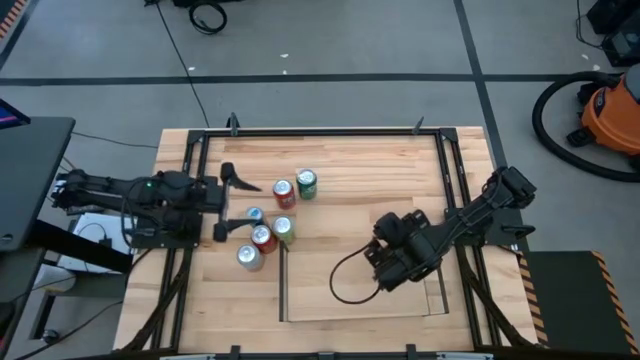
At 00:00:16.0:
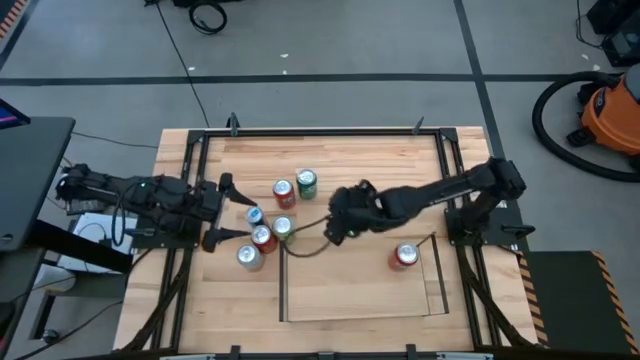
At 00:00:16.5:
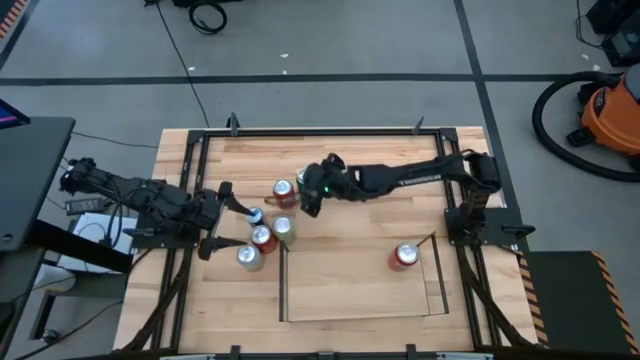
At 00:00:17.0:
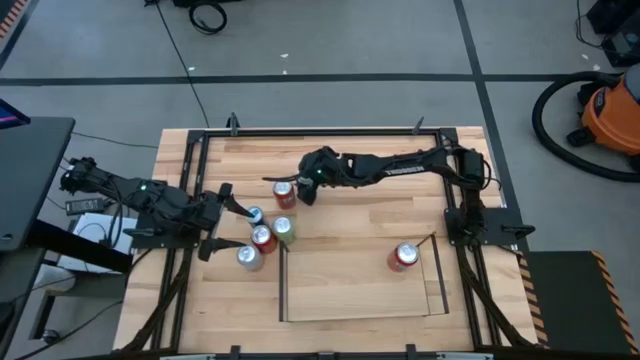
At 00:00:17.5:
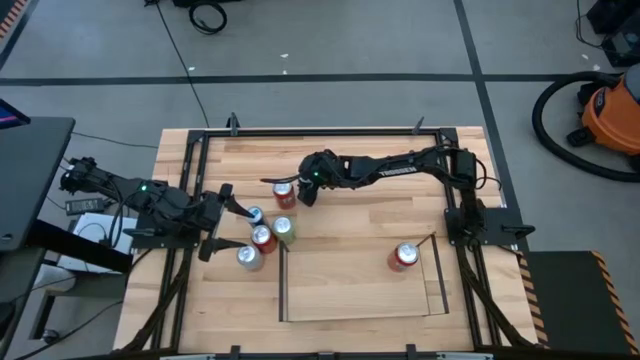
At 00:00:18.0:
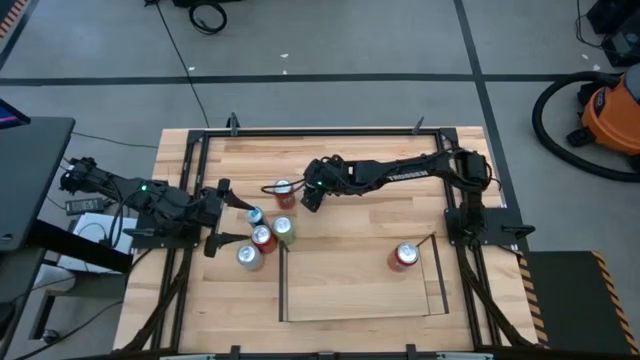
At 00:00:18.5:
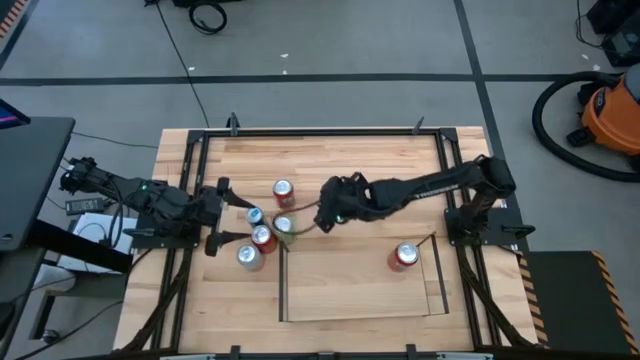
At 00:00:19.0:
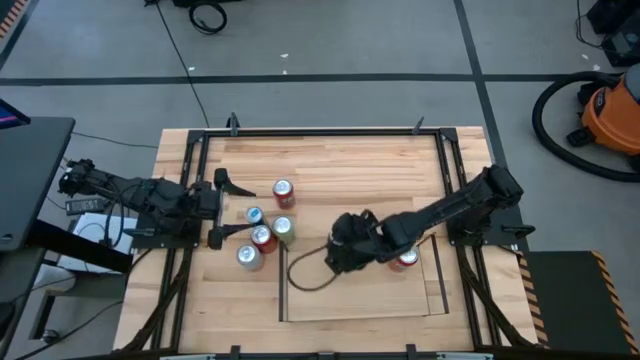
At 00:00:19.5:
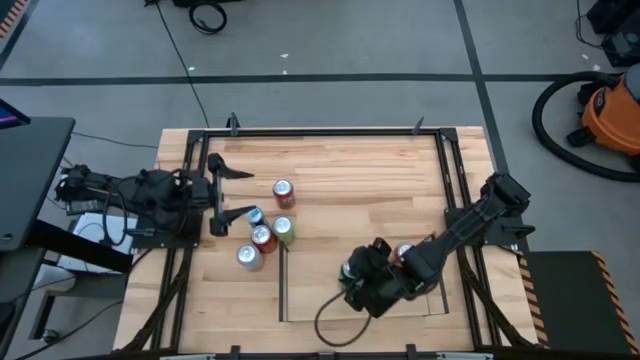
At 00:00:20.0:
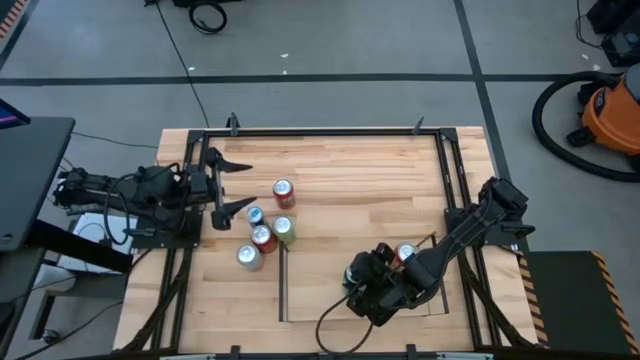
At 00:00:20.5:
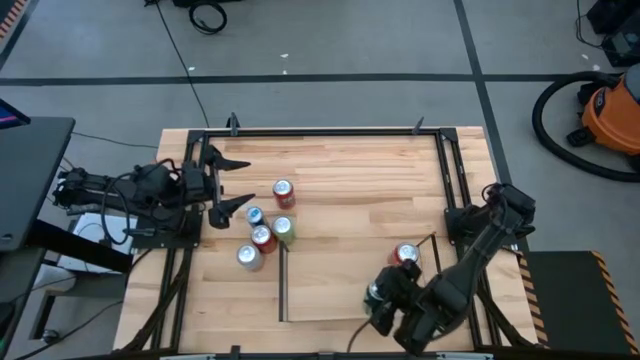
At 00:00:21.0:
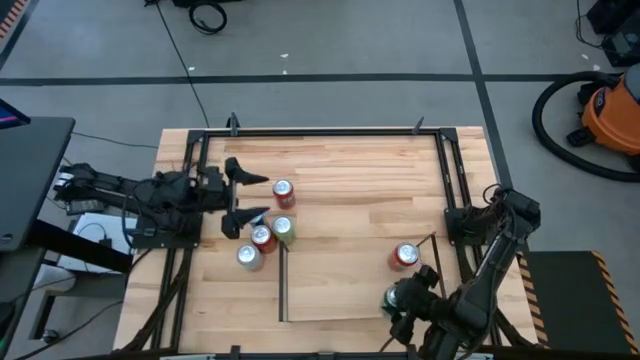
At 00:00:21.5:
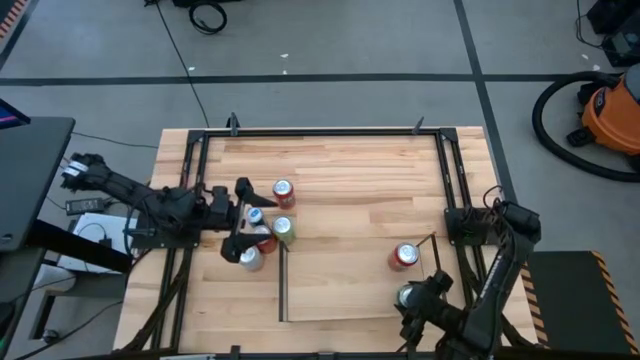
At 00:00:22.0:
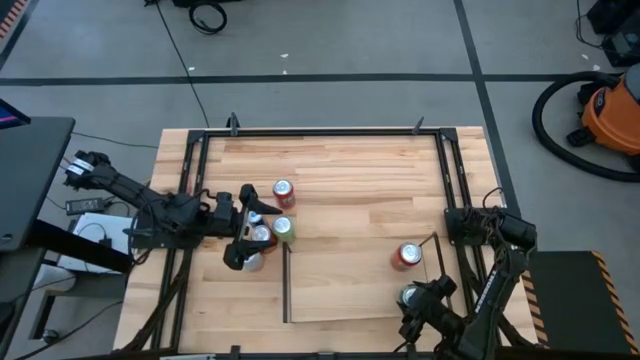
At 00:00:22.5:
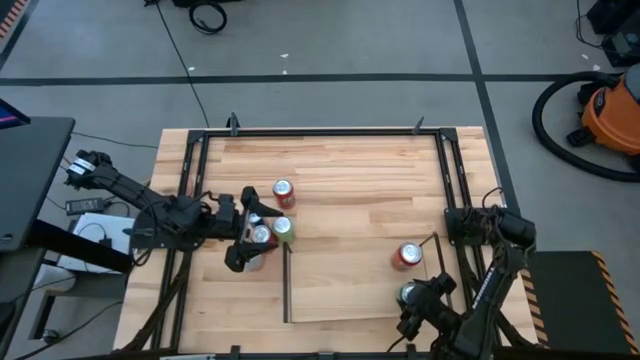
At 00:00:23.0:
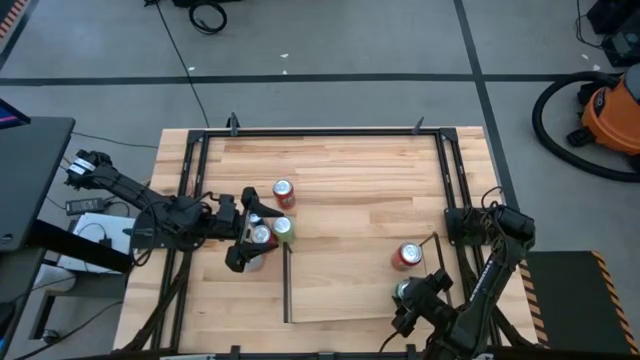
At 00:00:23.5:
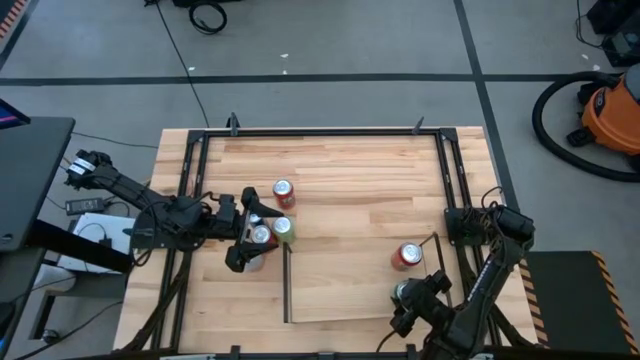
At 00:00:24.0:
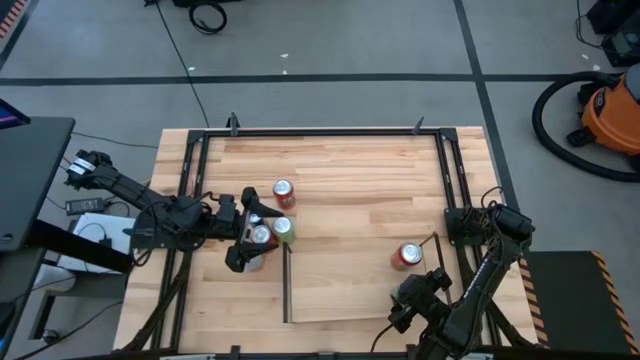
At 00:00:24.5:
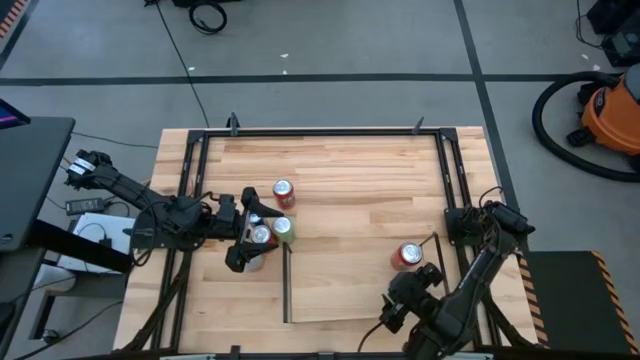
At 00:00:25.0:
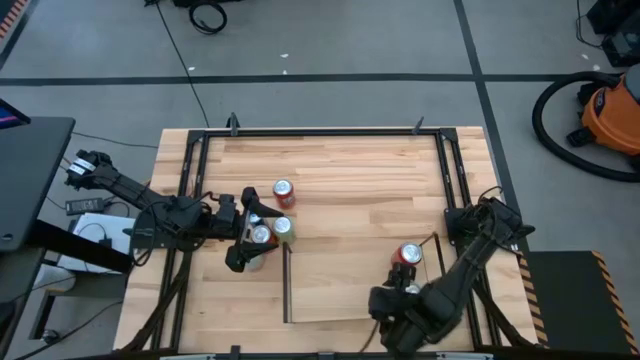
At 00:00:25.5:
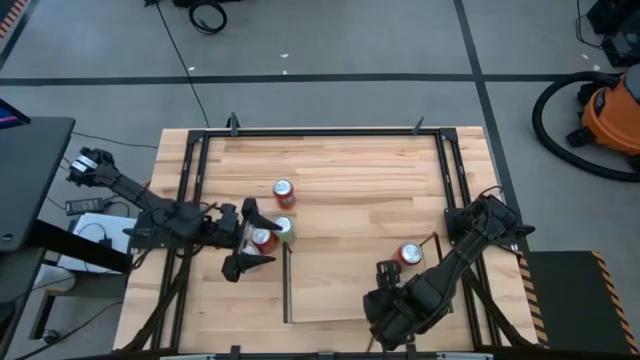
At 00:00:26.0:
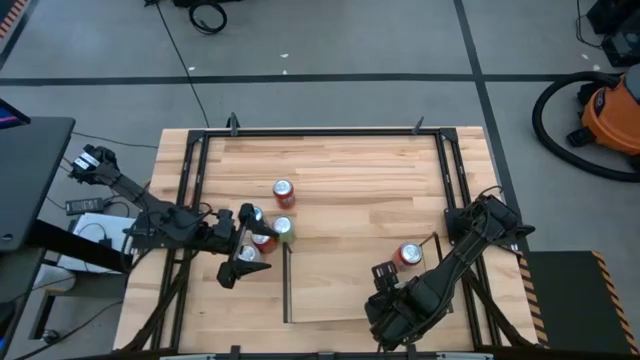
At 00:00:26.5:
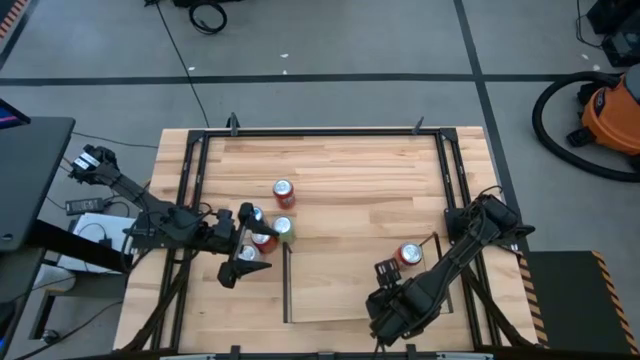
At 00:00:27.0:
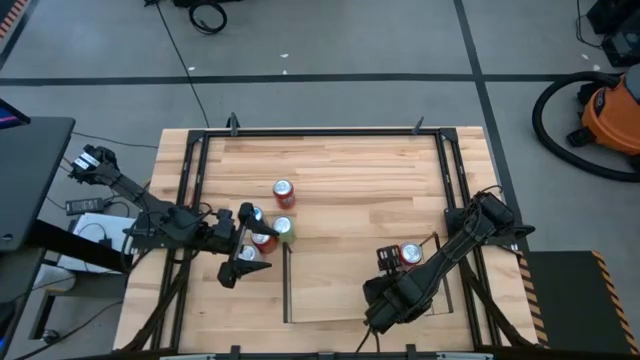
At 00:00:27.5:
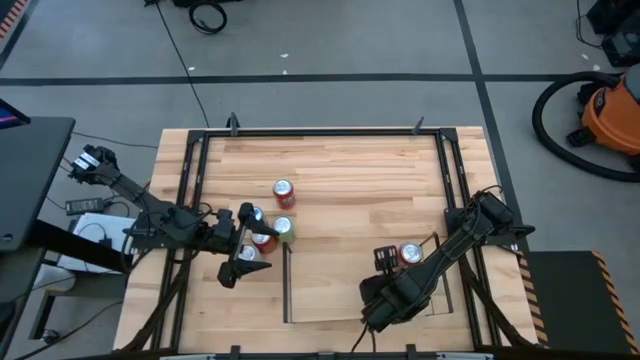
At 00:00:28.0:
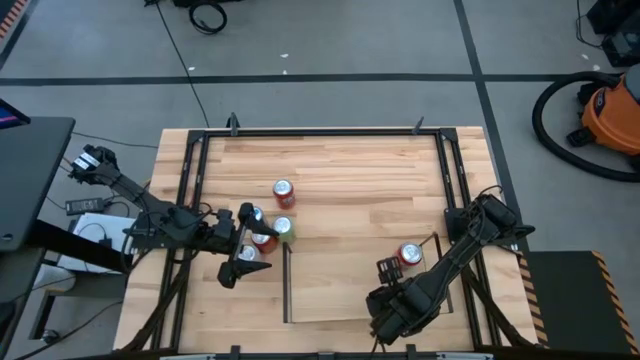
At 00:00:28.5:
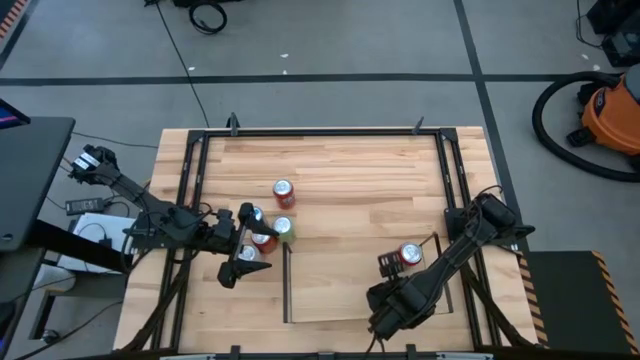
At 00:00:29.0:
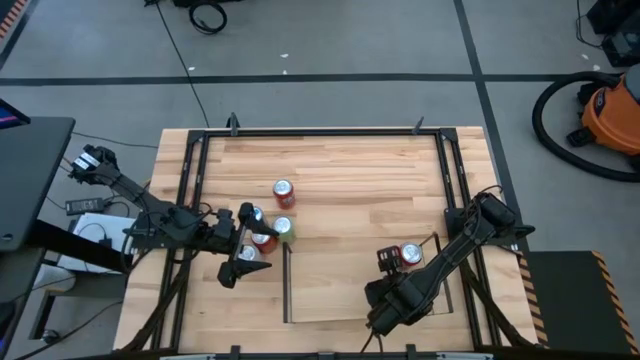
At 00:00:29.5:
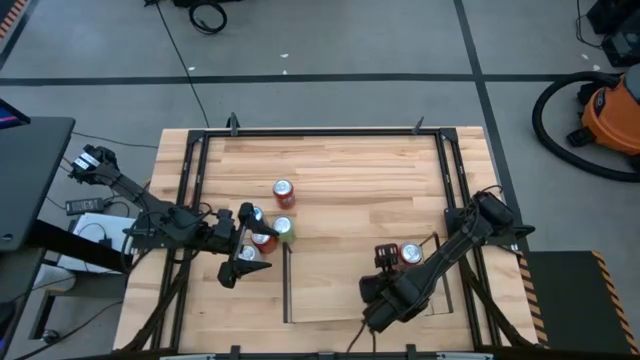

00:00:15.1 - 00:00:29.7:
Task: Place canned beverage on shelf
Put the green soda can on the shelf

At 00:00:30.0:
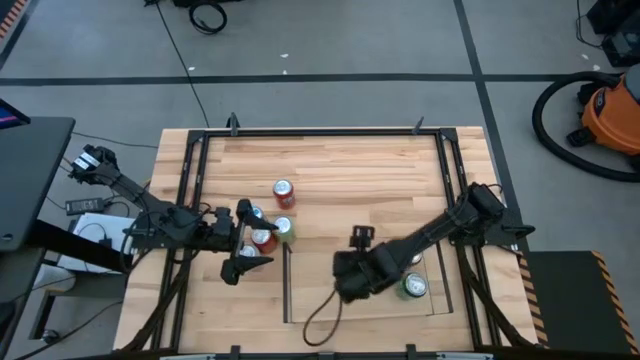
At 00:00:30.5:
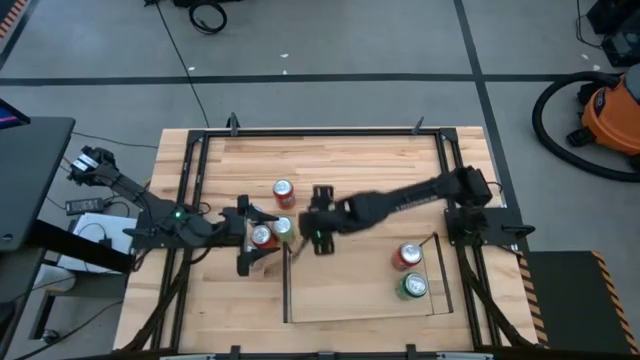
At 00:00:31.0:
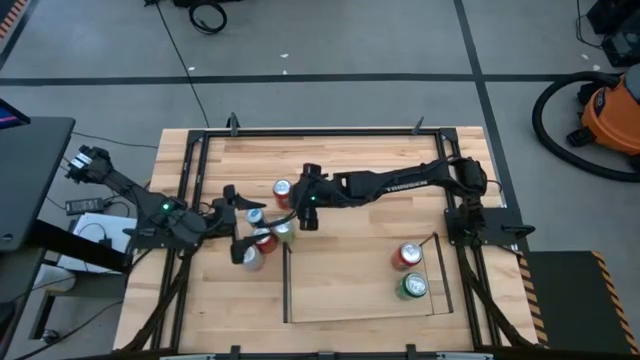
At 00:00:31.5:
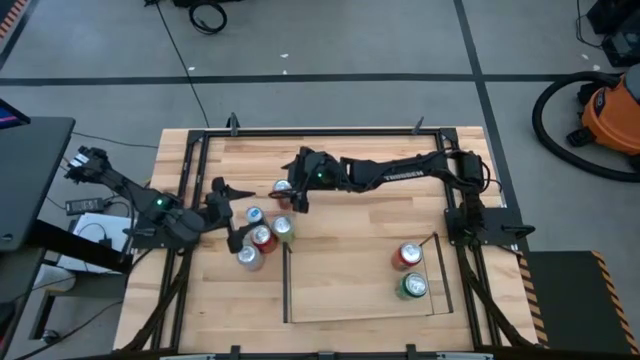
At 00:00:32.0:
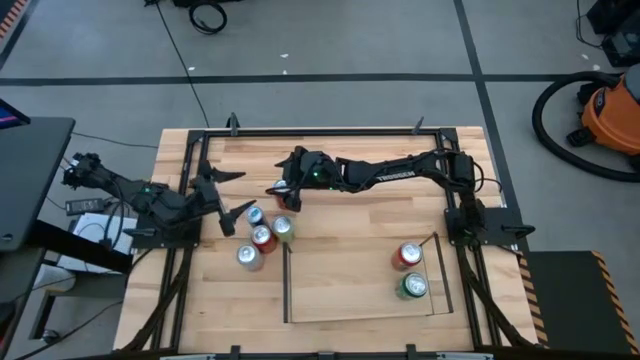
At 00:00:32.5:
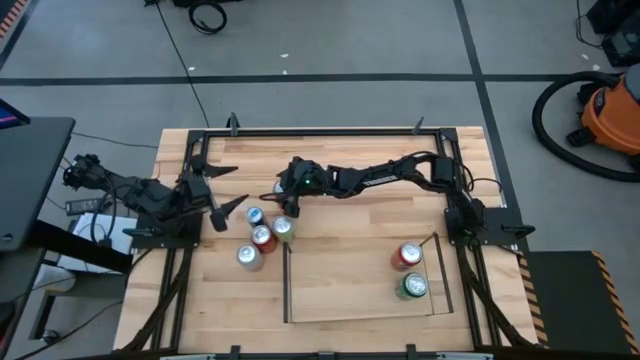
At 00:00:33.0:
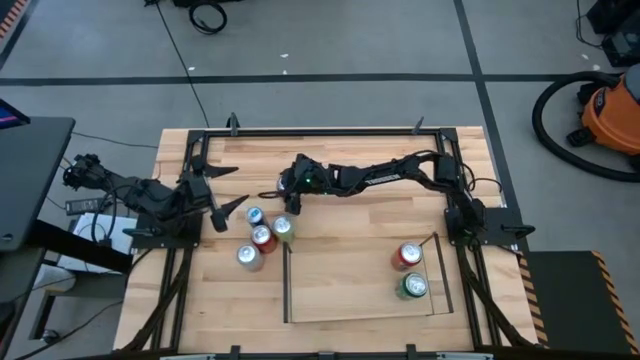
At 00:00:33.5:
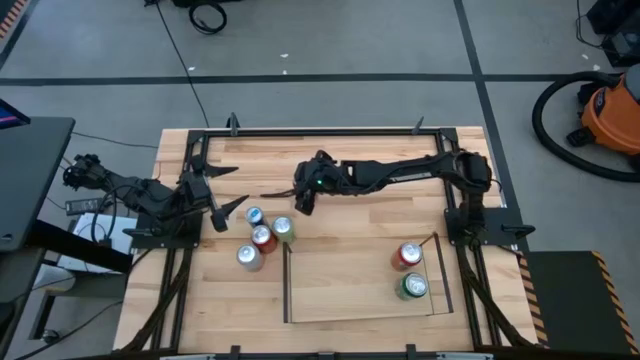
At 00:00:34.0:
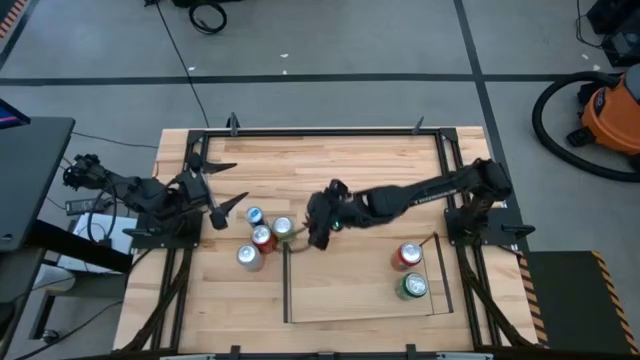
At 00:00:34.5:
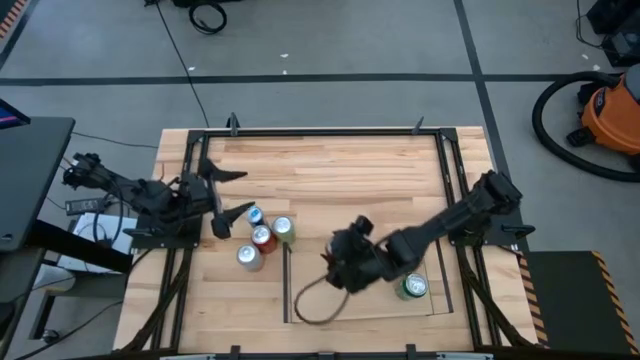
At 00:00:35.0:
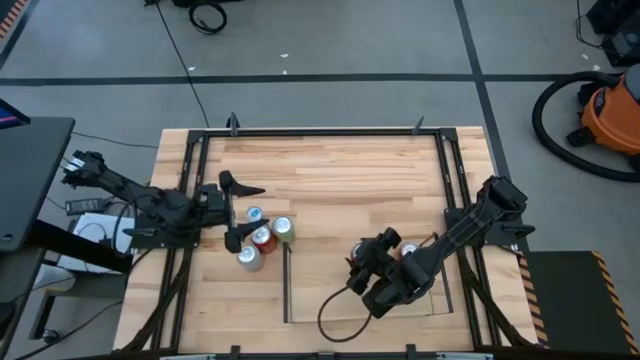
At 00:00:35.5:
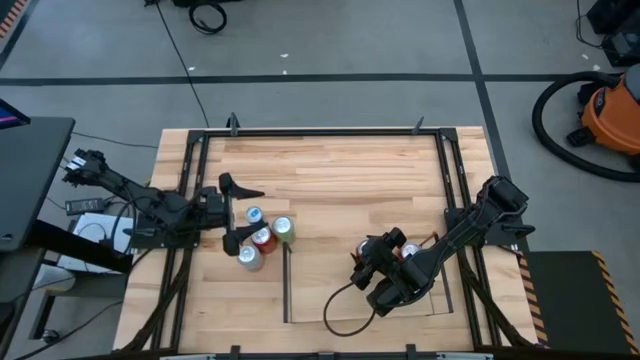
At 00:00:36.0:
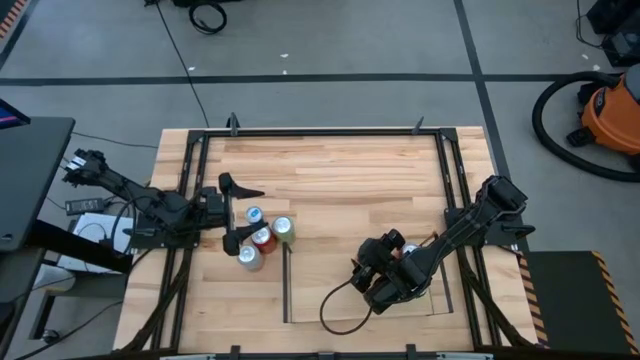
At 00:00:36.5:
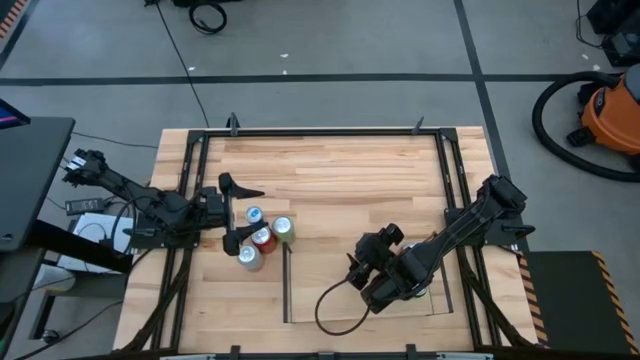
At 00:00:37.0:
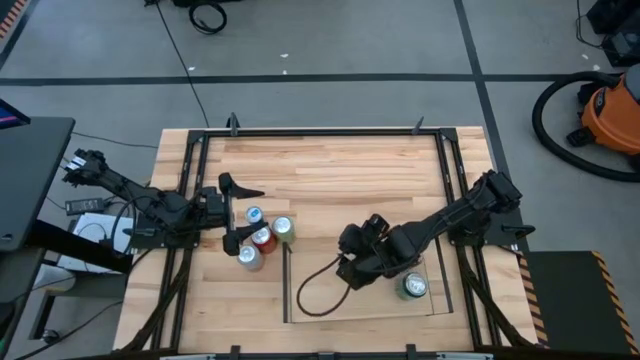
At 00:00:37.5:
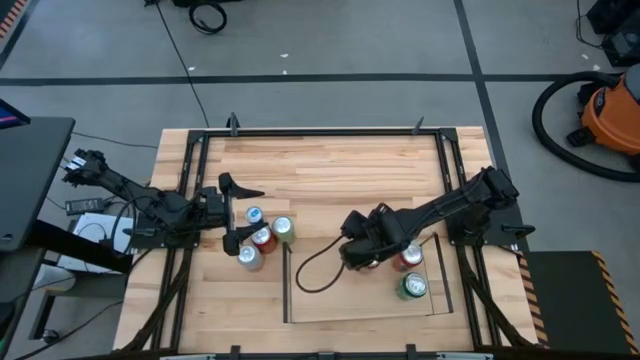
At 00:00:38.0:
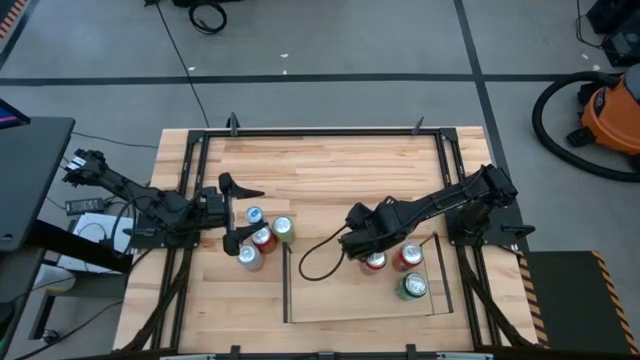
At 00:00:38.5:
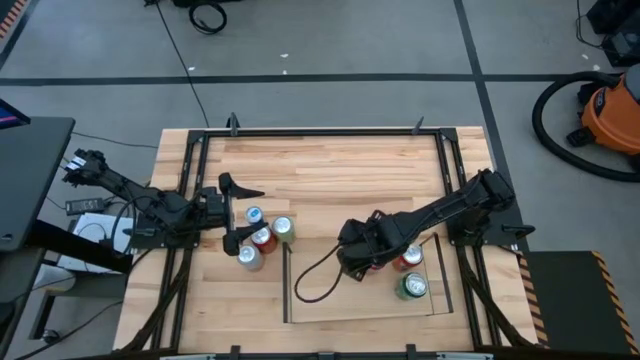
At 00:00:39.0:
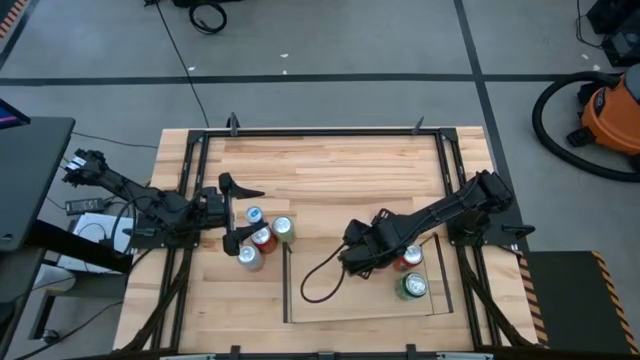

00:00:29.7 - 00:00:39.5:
Put the red soda can on the shelf
